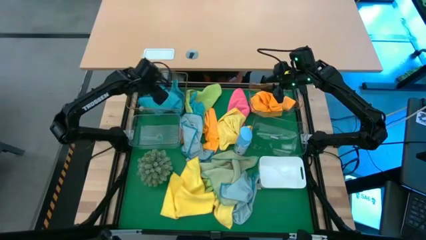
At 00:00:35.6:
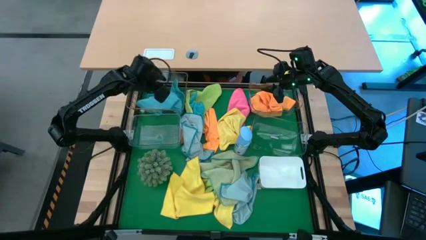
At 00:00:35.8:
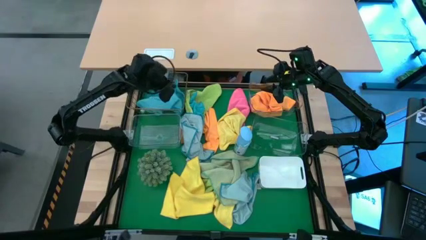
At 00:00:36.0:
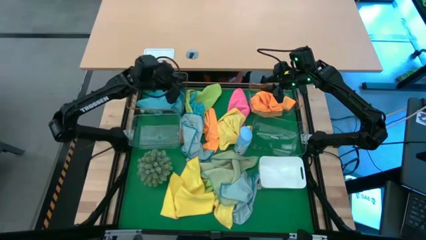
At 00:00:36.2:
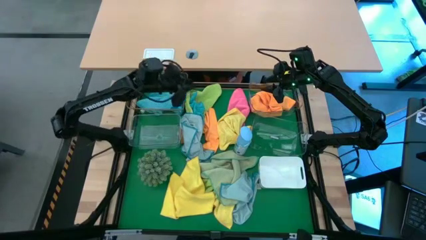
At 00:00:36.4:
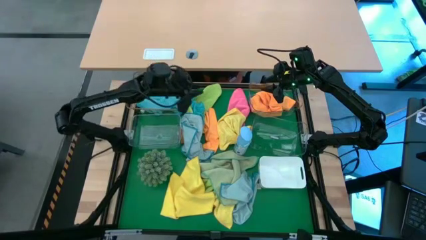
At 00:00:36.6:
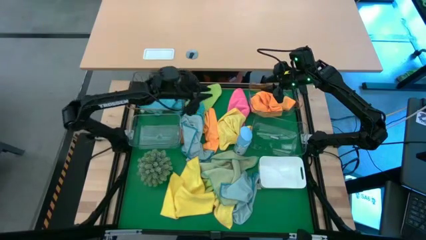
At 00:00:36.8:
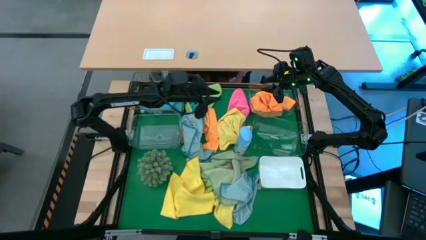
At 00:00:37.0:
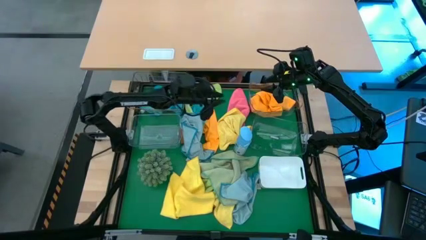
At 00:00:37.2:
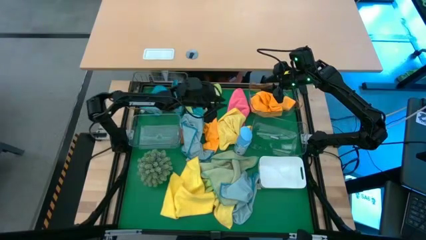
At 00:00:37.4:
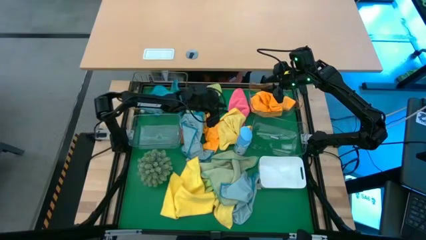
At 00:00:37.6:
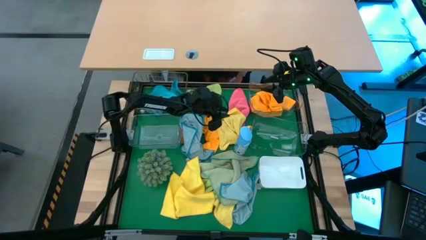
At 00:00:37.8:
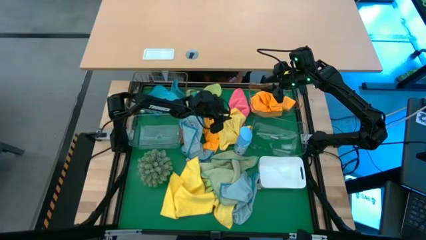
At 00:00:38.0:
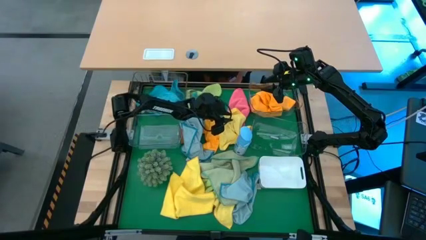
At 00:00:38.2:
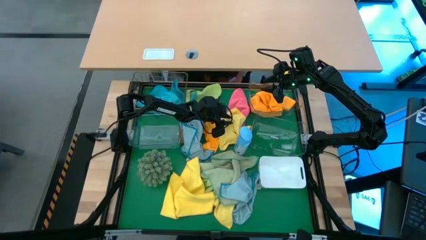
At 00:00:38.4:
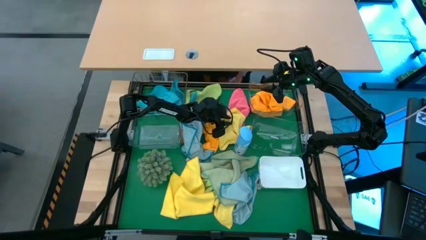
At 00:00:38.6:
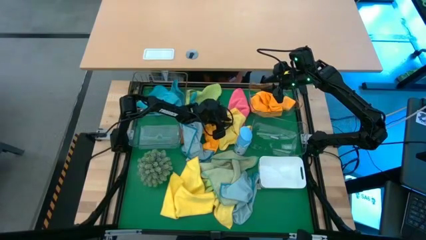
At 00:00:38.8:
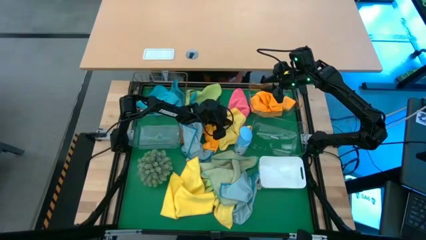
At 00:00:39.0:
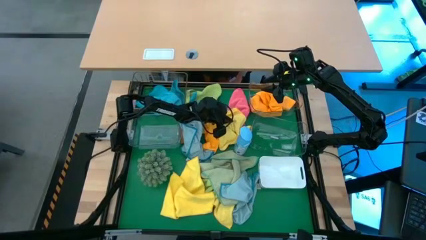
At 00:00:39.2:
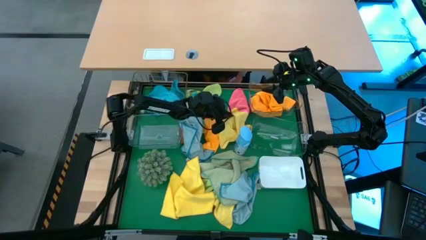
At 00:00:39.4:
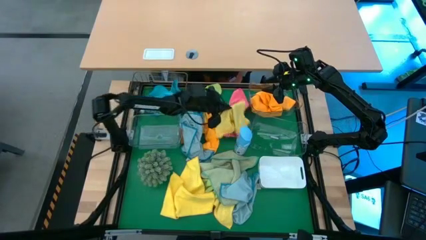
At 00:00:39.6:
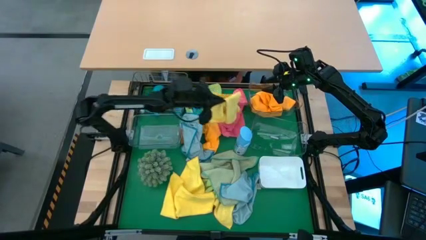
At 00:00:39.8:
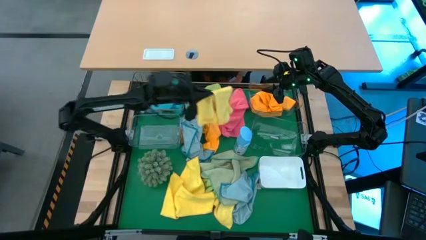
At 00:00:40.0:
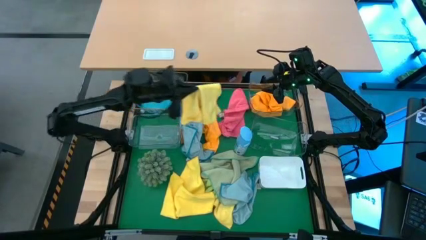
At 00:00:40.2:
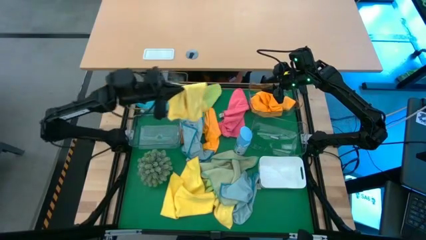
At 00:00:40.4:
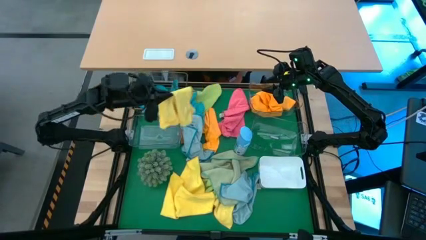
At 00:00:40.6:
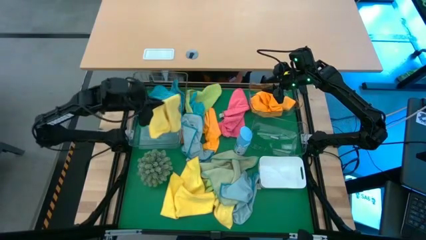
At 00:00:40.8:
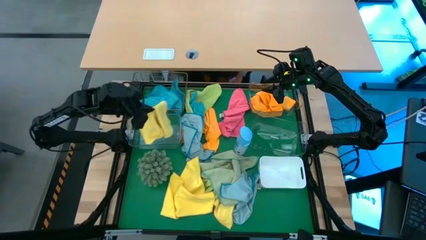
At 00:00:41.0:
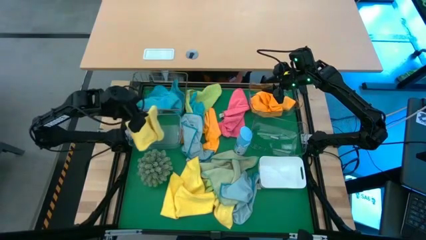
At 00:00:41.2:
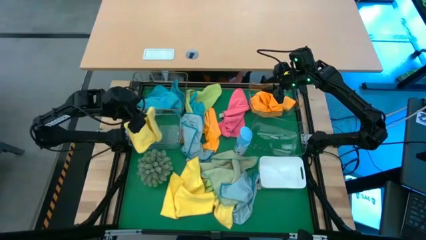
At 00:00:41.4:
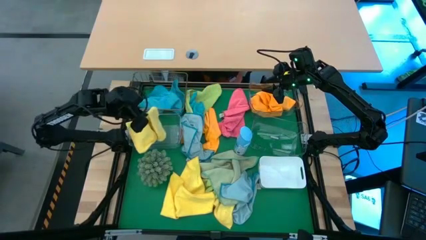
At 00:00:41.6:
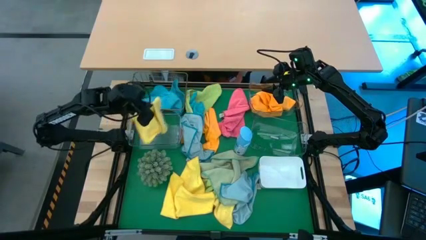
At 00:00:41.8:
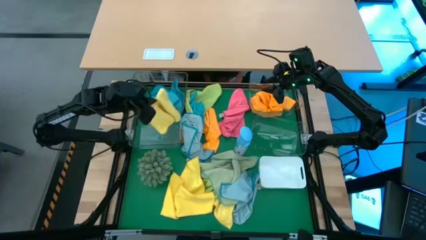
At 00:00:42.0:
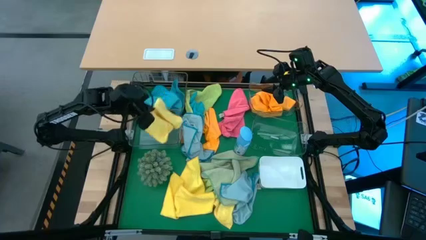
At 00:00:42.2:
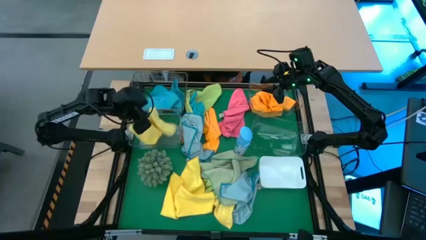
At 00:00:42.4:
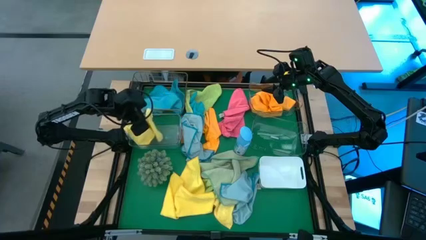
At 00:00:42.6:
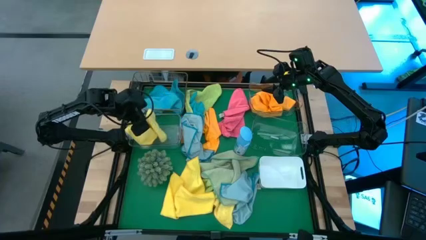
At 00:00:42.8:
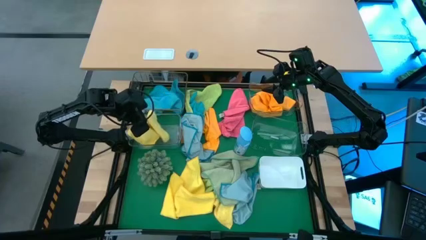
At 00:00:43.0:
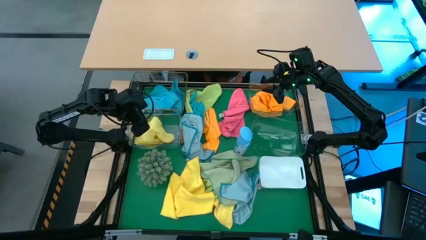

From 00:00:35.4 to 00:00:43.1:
Task: Sort microfiber towel by color & place in baskets
Put the yellow microfiber towel into the bottom left transparent bin

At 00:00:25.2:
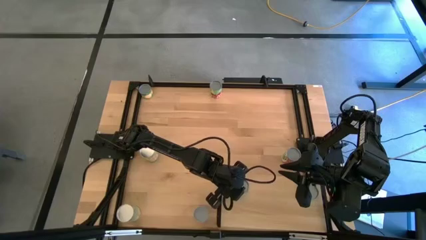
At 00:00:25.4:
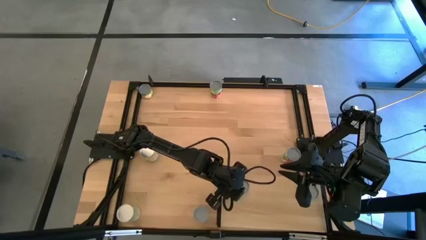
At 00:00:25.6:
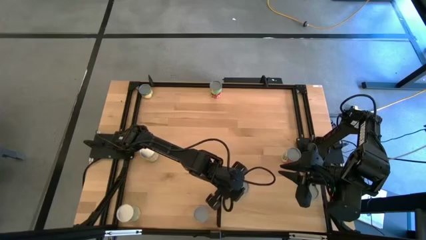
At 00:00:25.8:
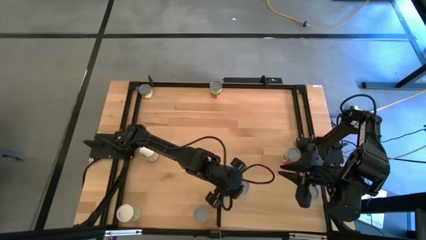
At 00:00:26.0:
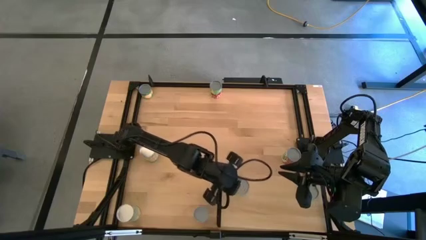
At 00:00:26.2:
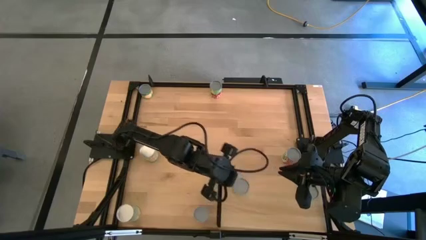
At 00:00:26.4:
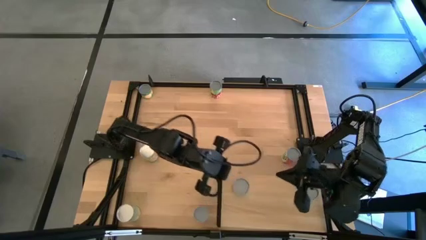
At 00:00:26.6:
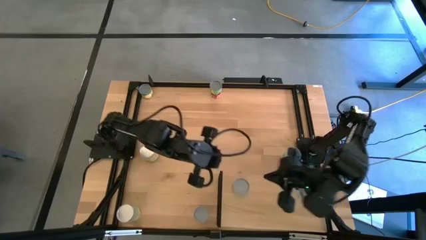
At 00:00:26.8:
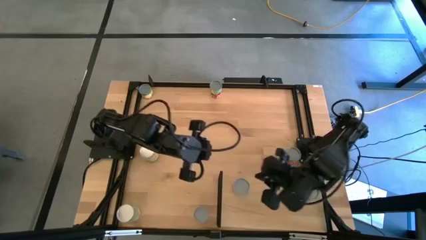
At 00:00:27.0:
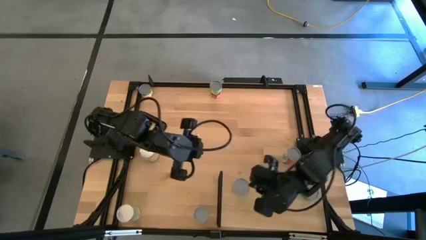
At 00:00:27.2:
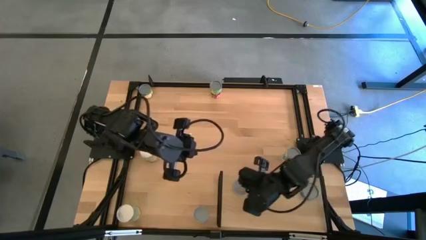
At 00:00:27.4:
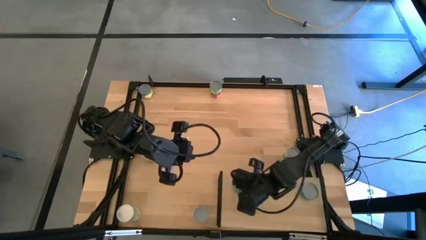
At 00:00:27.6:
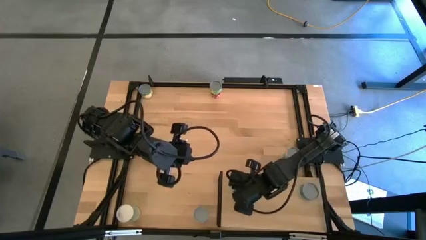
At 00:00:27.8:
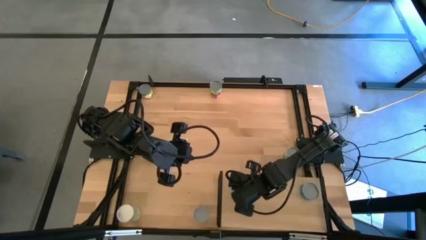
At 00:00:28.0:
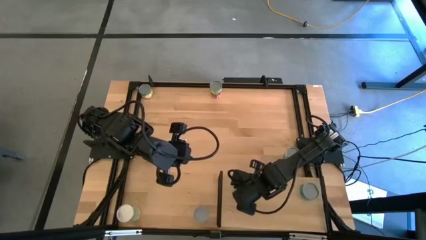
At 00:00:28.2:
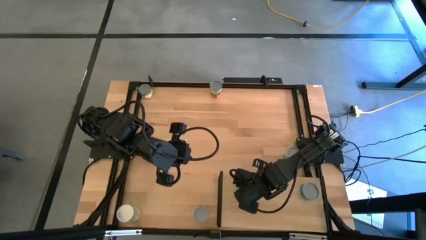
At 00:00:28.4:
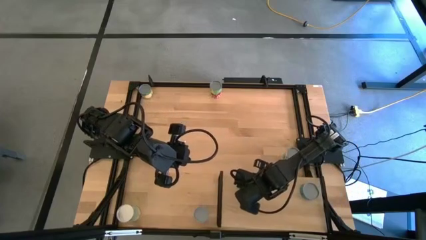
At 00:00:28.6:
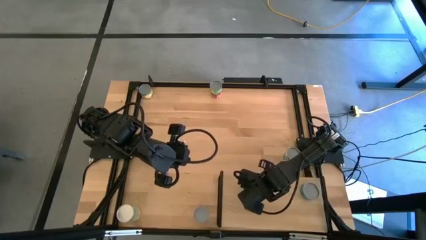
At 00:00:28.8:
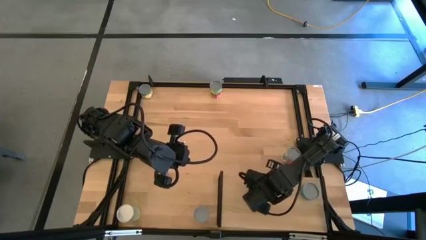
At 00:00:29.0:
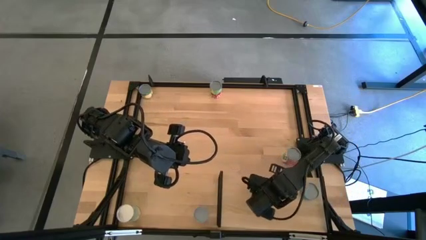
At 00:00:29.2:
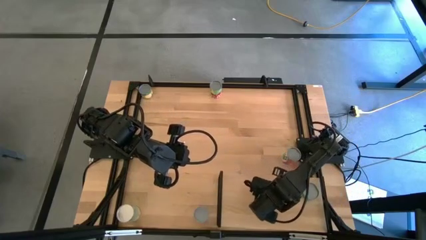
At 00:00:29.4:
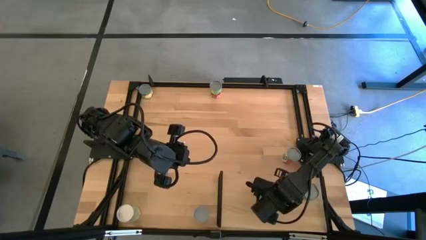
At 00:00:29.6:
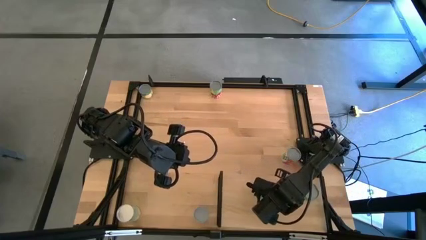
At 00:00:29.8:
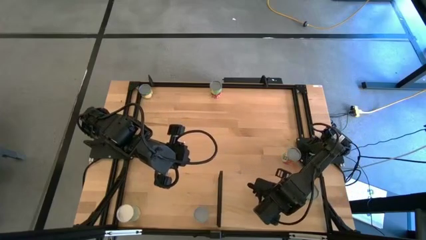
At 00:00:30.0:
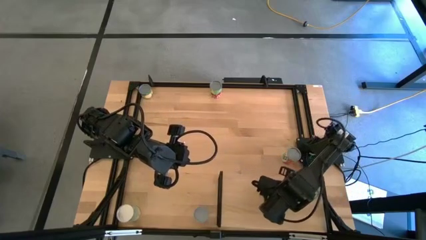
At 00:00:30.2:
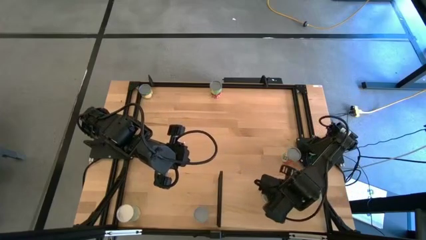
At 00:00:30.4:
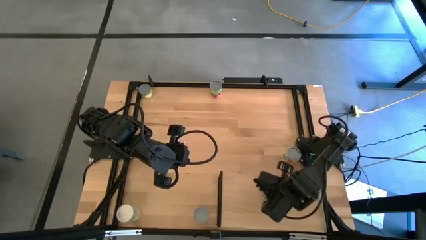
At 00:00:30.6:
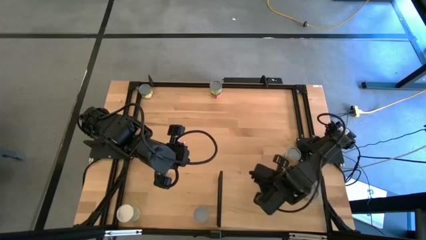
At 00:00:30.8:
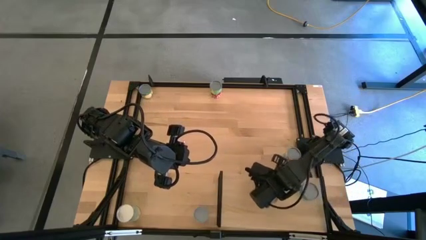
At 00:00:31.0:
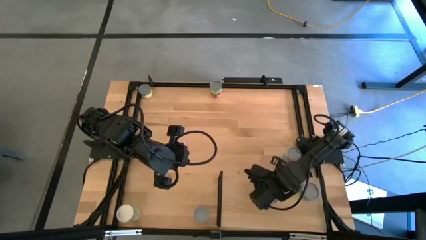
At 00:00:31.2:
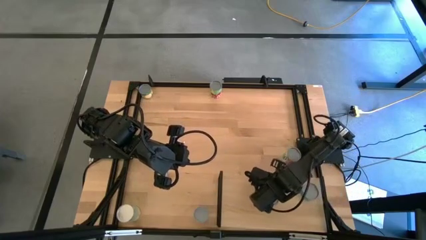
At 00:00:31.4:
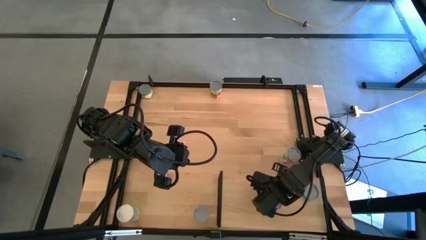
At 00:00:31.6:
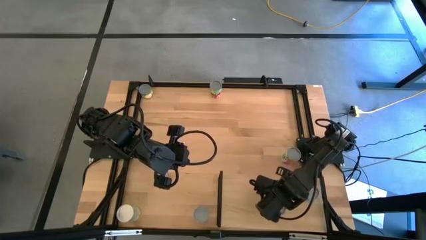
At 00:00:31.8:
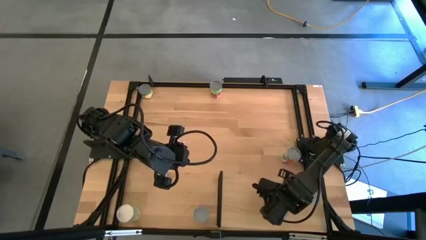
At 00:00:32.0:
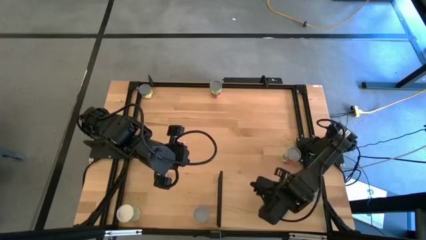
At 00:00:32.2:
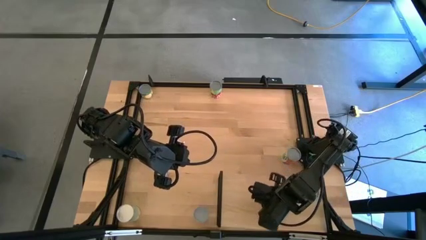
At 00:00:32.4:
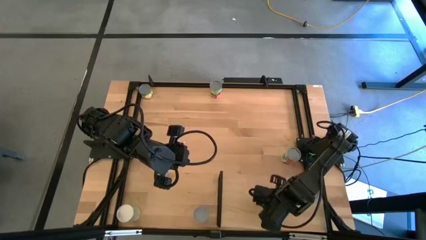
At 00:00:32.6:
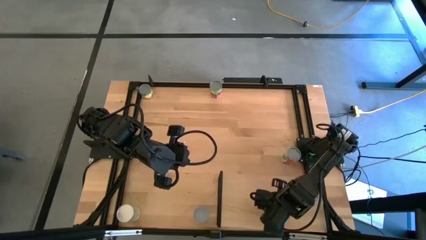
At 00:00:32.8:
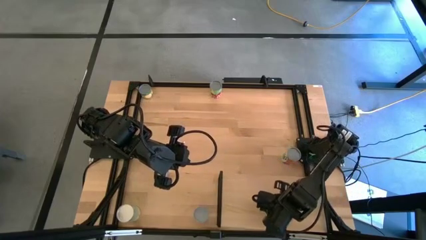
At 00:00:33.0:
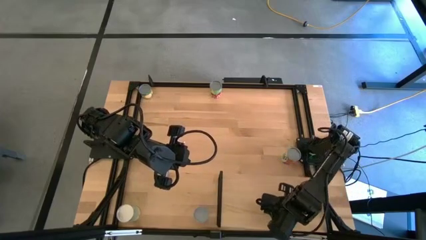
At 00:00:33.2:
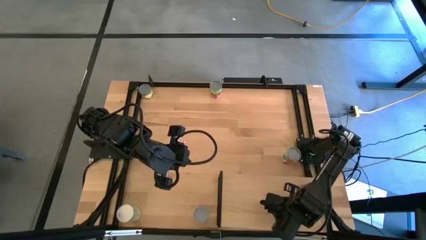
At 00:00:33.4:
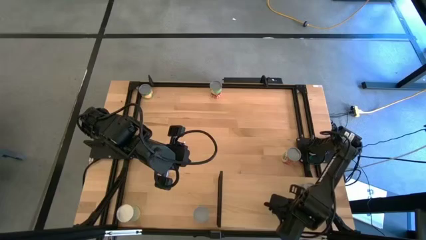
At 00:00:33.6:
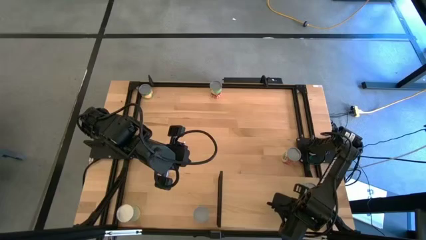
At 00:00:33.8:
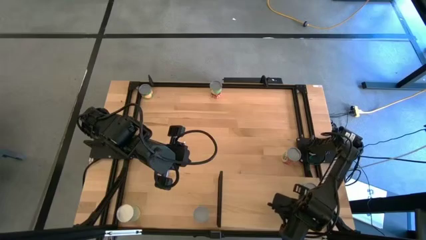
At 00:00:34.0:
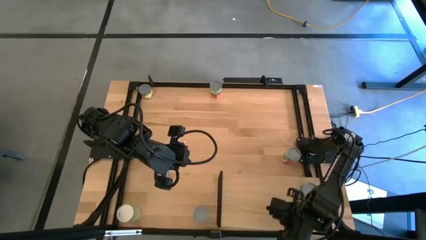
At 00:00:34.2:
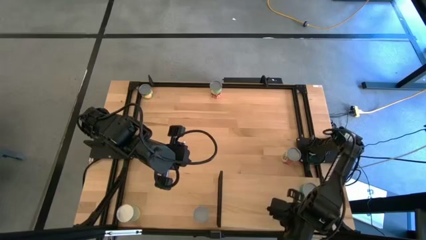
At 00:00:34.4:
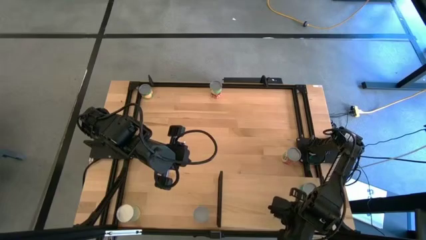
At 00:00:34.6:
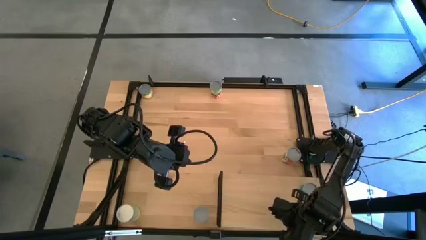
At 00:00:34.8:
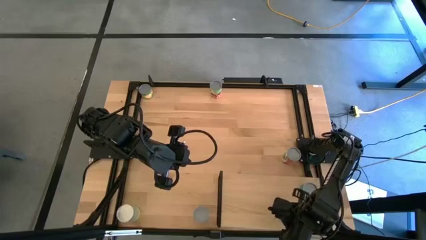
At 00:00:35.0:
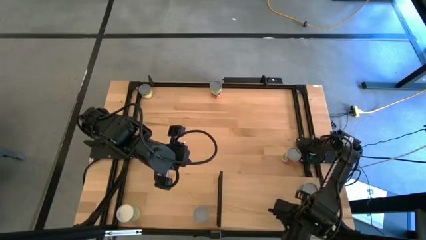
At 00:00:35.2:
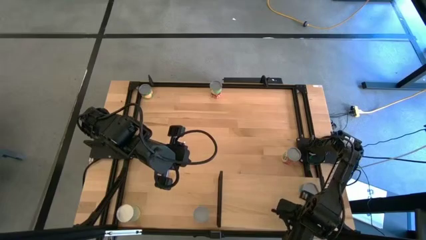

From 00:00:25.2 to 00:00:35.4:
Task: Pick and place cans onto a shelf
Put the canned mushroom on the shelf
